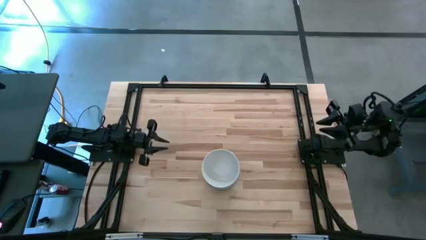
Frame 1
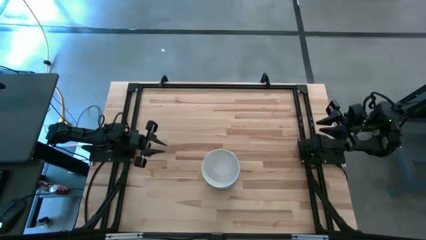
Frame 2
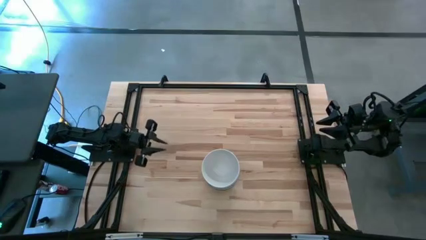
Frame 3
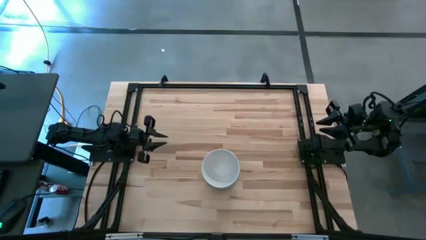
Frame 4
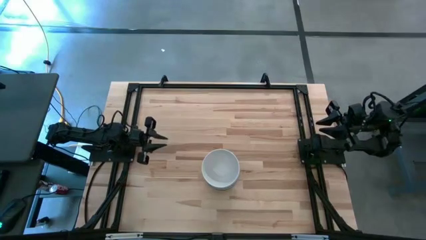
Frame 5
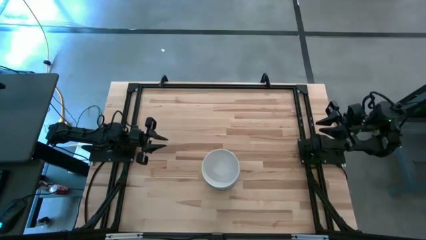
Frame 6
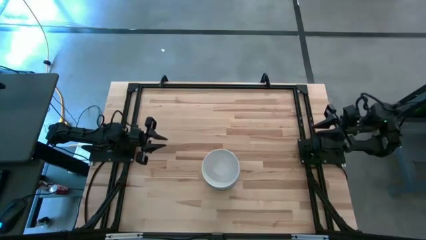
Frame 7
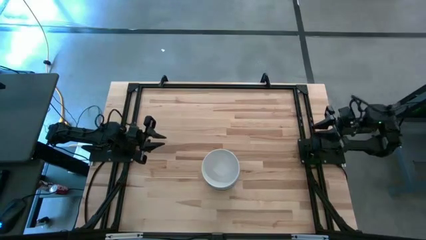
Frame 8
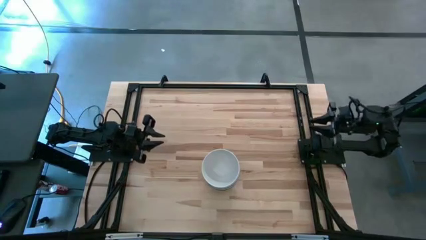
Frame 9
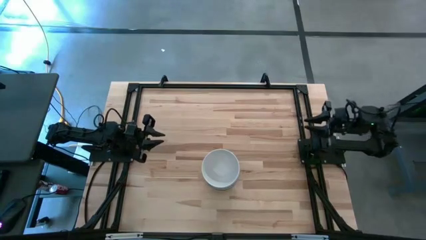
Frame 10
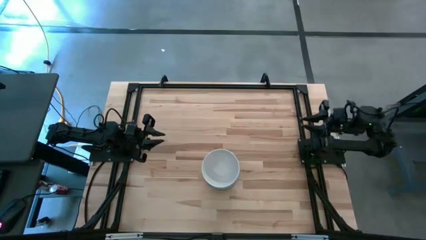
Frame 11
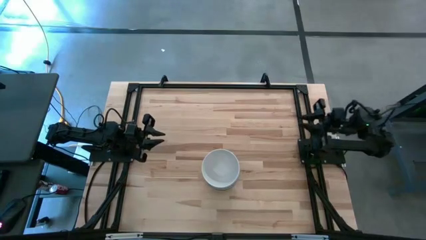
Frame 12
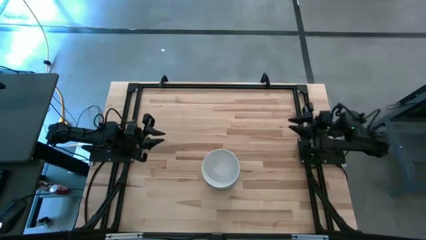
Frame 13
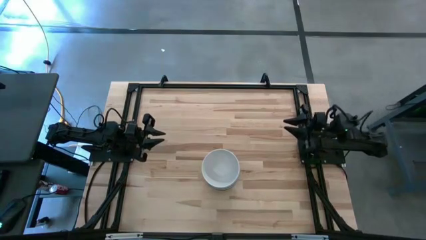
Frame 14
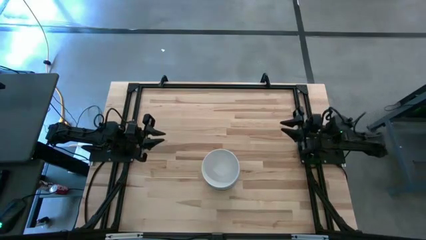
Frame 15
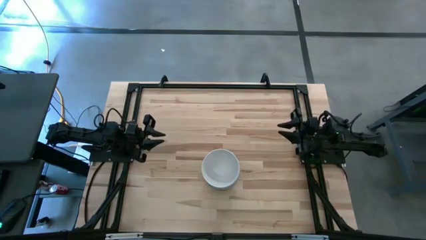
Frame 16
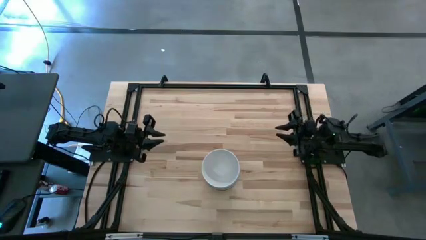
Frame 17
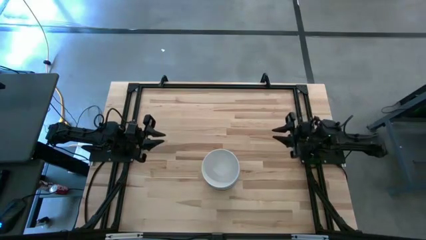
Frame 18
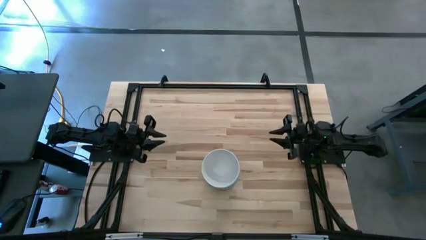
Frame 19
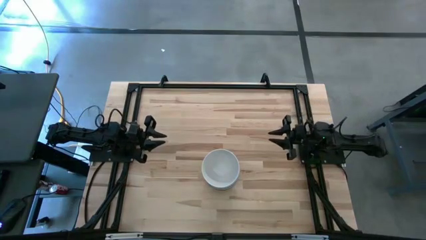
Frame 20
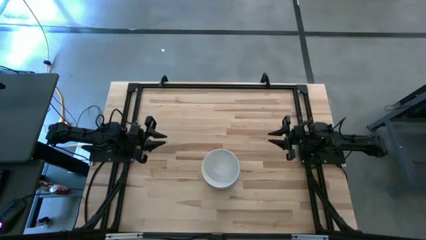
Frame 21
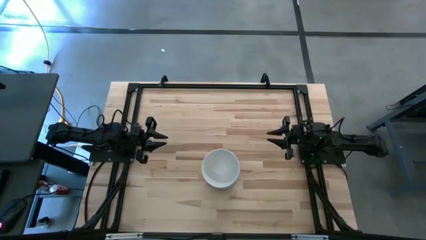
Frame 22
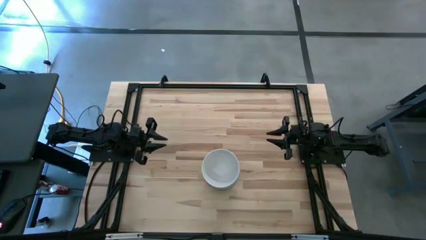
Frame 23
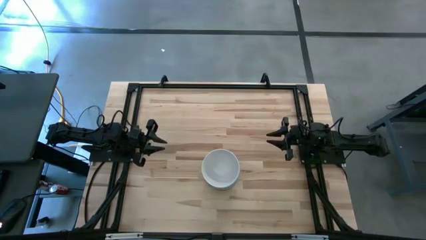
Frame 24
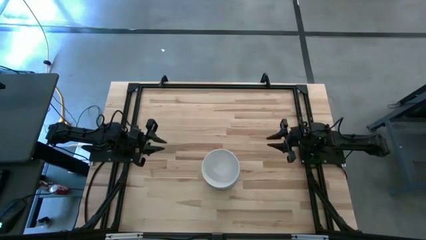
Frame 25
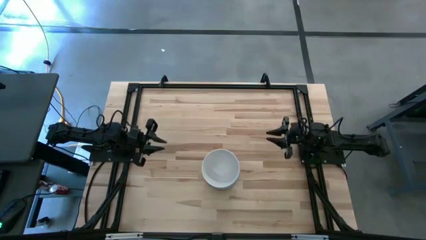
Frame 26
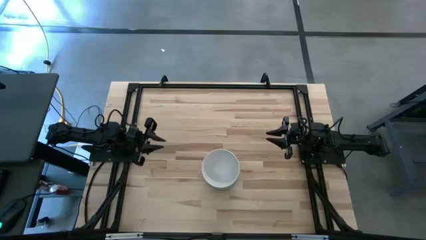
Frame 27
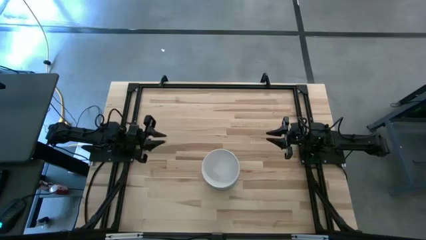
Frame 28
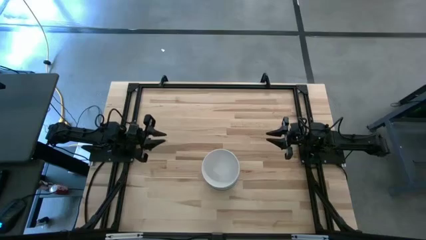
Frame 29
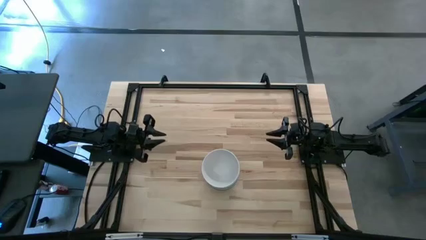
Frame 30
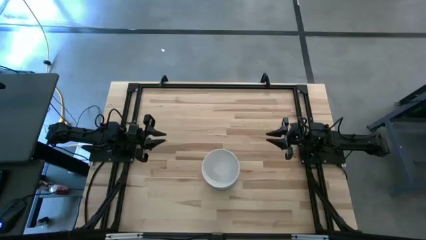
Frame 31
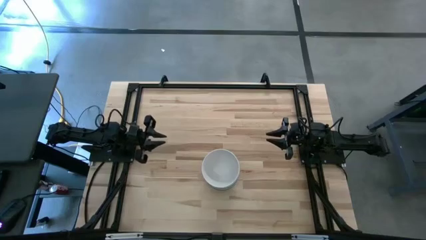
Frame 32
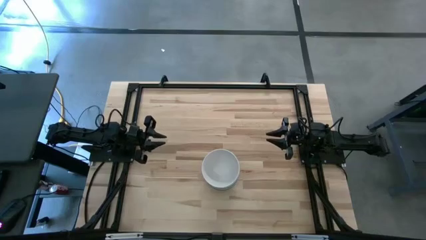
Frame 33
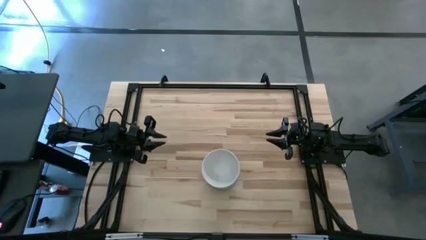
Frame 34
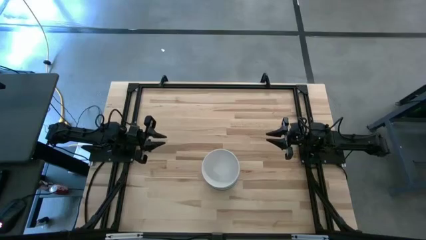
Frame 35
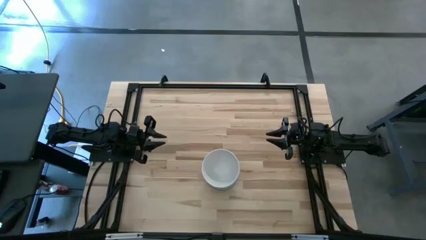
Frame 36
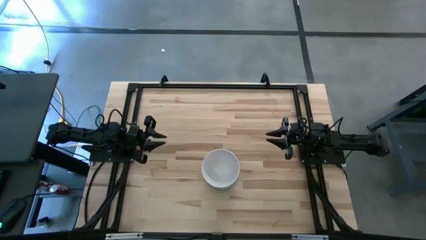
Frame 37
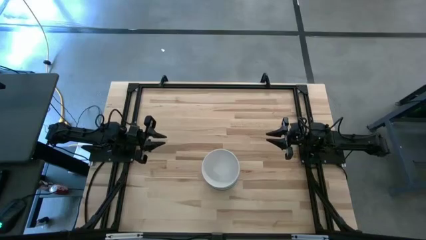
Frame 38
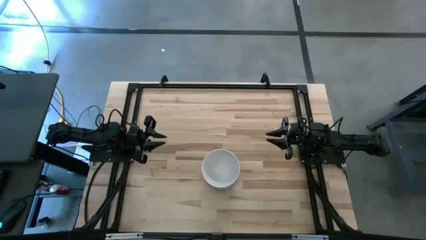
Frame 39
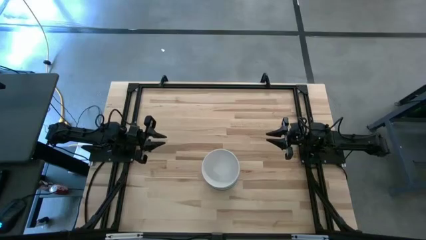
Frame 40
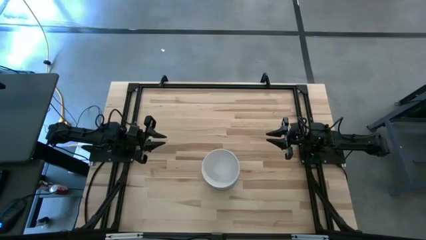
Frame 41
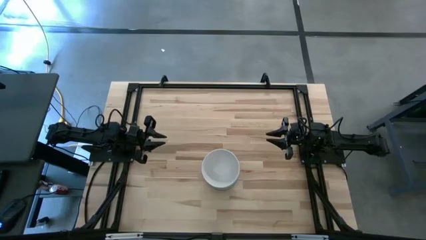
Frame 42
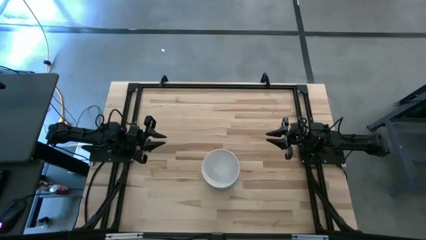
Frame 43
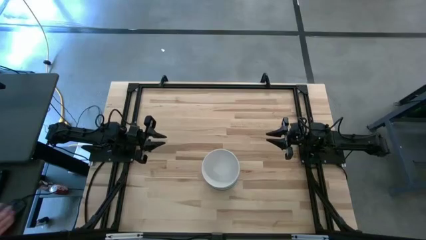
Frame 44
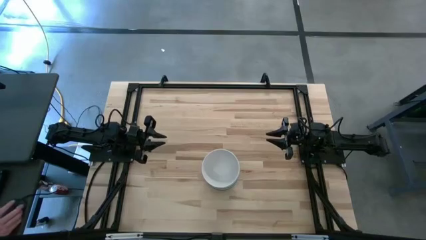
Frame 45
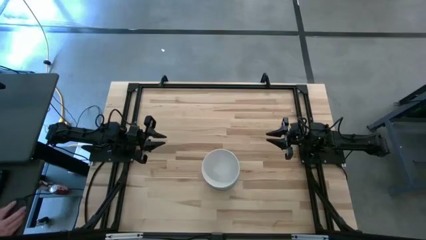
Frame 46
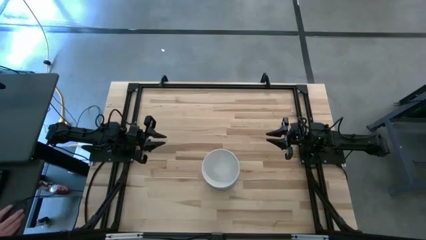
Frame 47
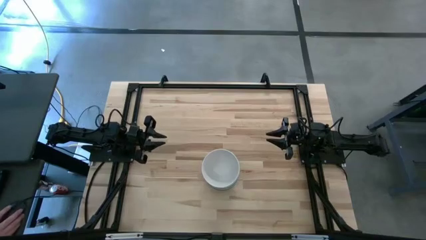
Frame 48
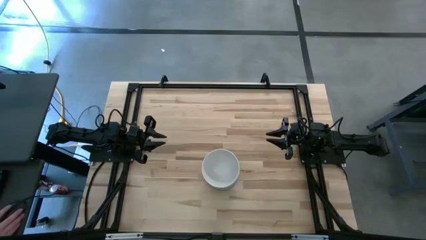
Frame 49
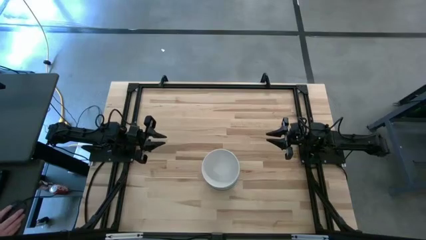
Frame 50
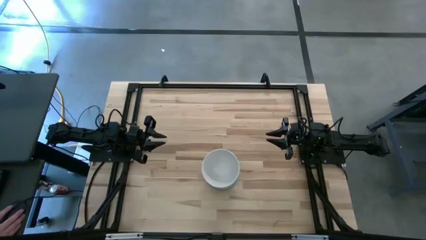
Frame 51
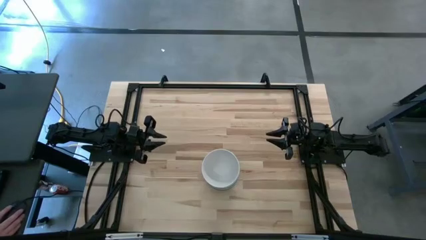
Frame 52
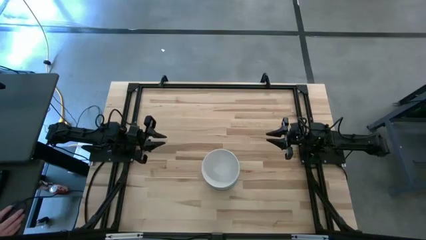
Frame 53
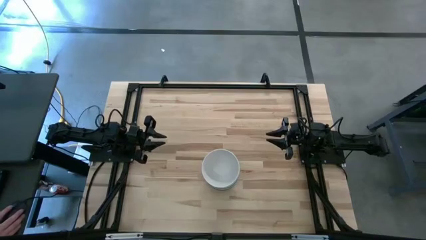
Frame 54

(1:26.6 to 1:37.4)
Task: Nest bowls inside each other
Return to Home Position

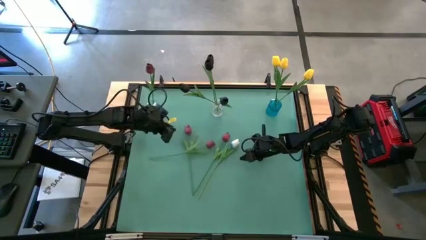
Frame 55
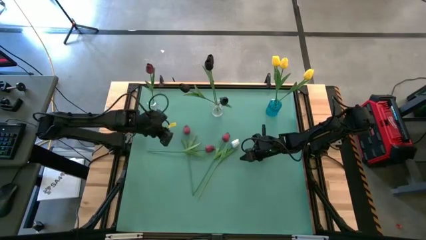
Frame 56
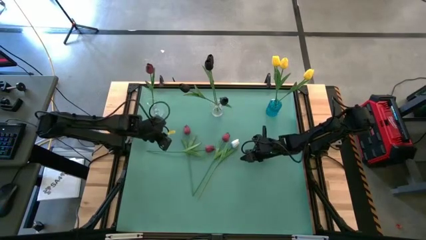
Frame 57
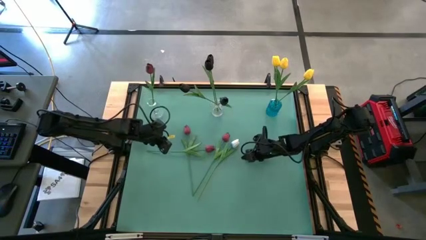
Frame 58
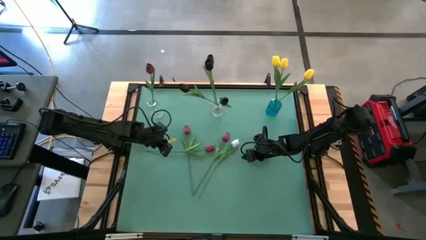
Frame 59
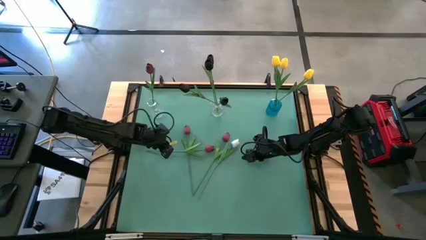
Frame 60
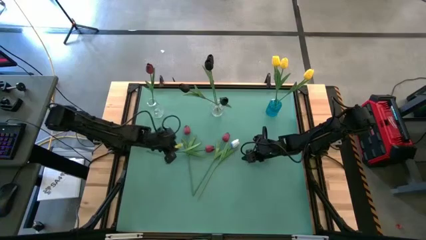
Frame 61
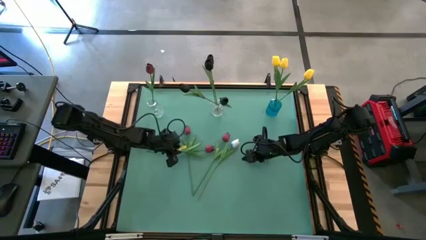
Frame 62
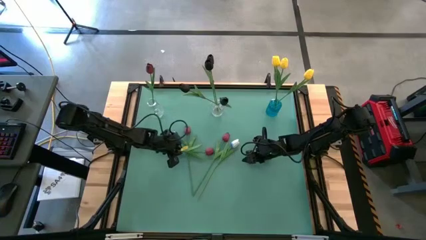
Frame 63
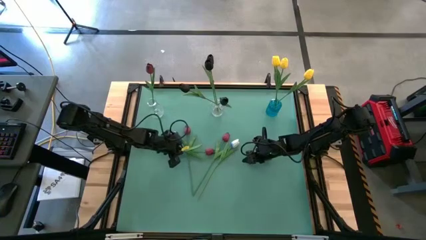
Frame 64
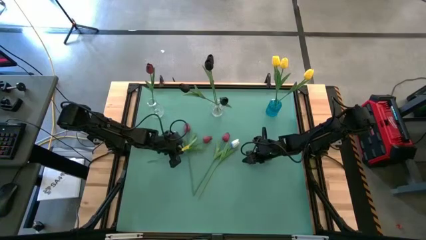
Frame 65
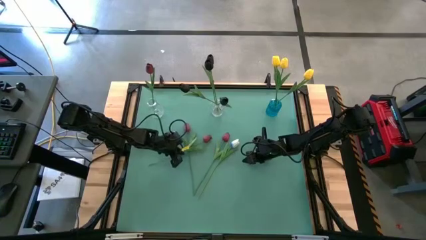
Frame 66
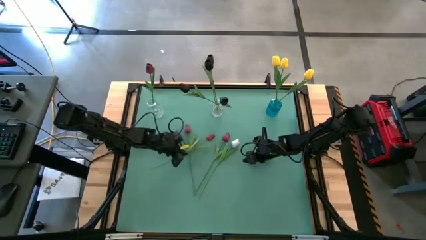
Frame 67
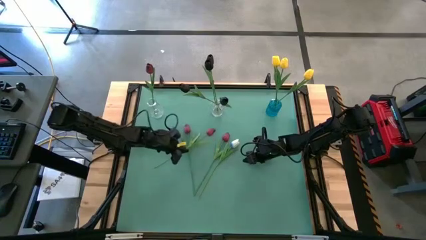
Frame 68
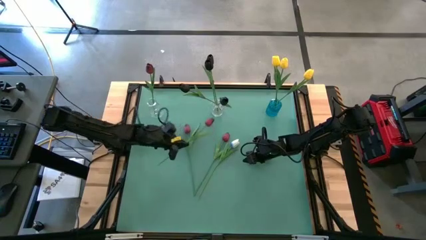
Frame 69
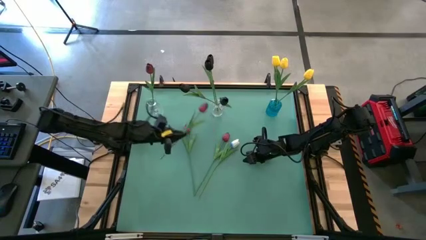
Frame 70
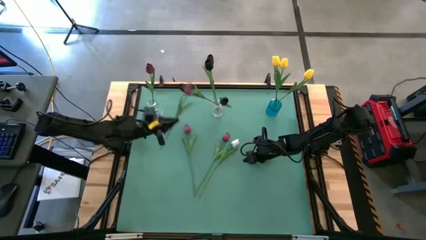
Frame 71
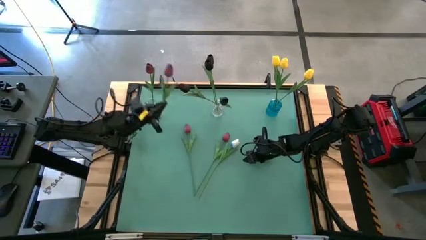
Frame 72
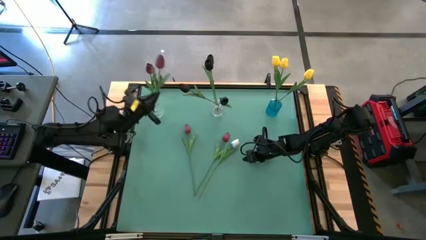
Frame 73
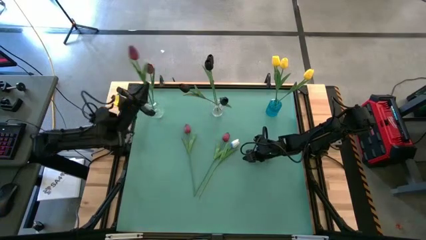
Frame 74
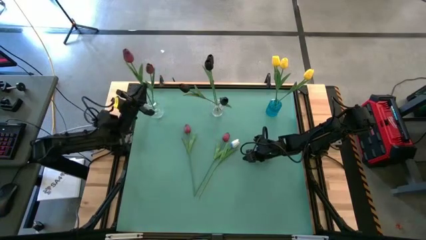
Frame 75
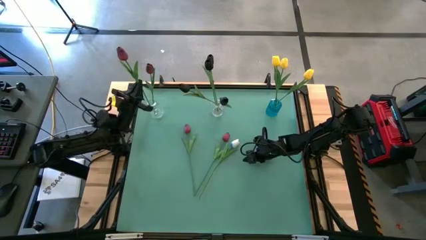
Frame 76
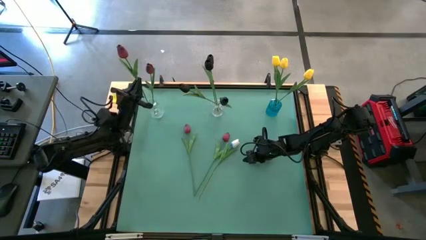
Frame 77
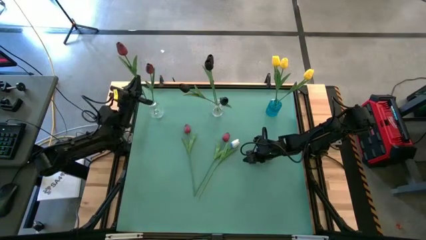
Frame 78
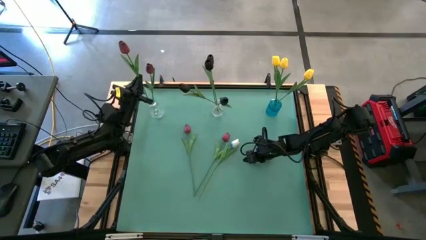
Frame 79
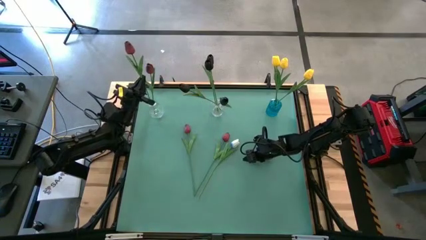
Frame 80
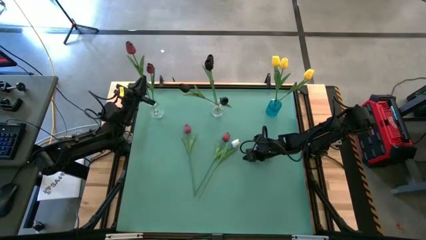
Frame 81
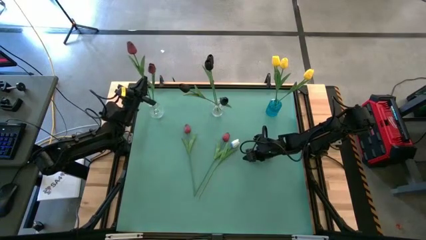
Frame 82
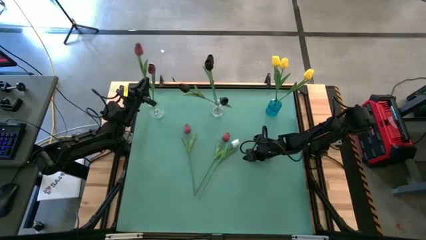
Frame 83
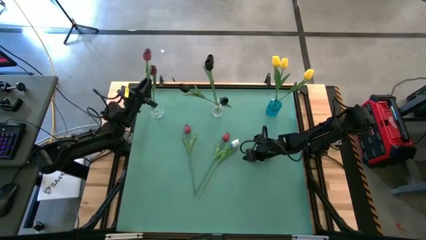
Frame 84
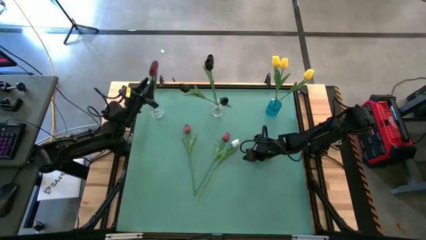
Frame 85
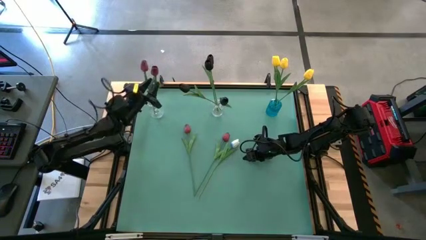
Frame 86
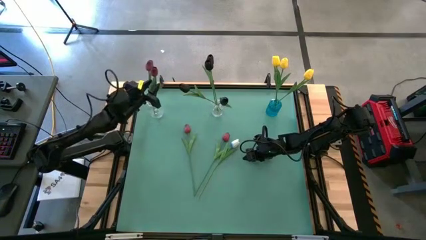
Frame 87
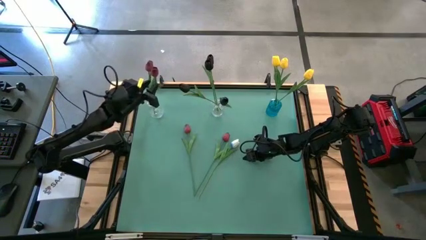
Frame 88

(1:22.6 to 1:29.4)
Task: Sort flowers into vase by color
Put the red tulip into the left transparent vase
